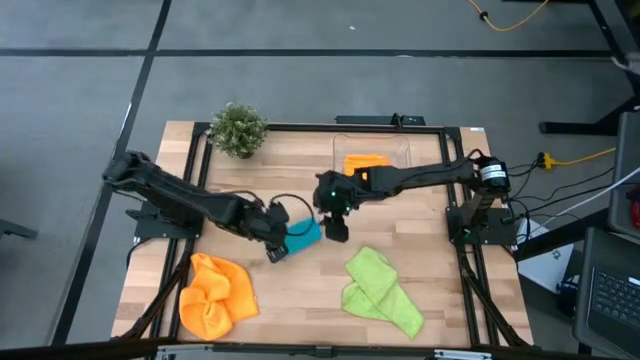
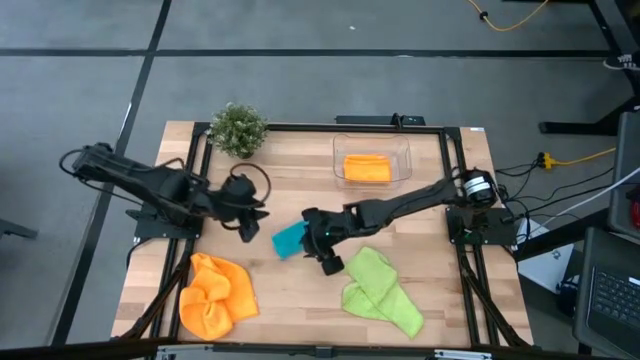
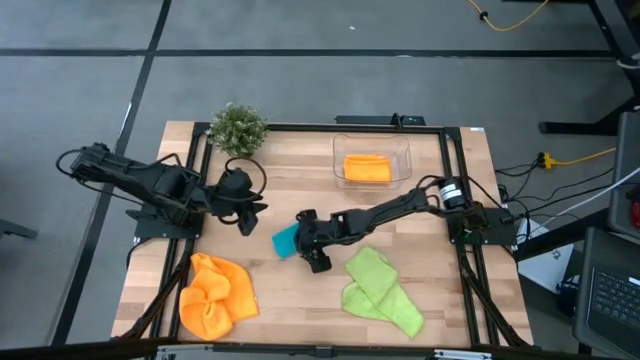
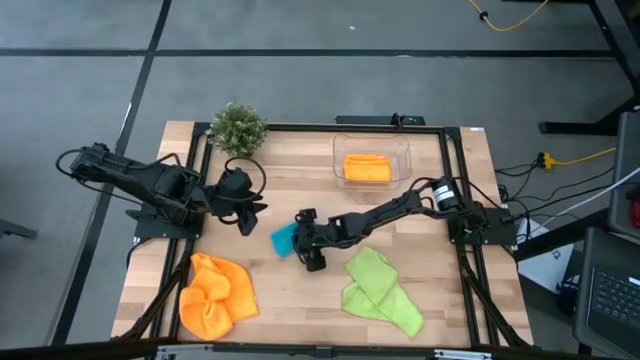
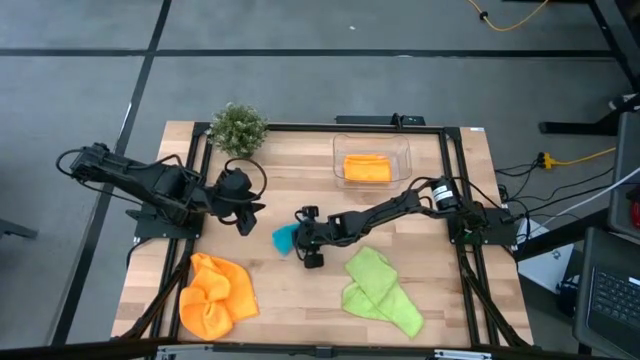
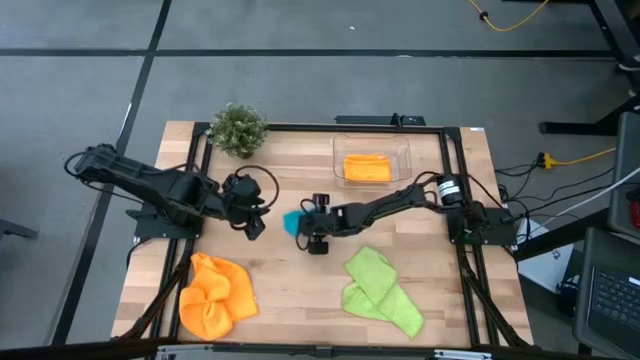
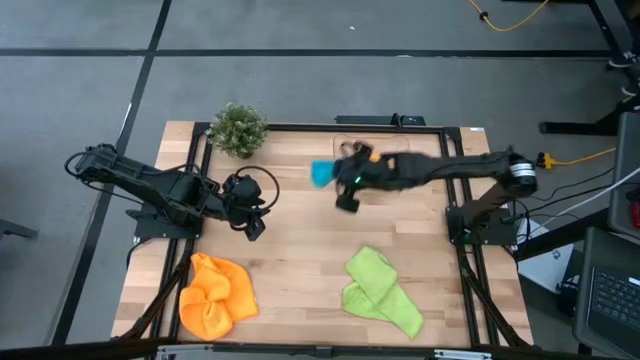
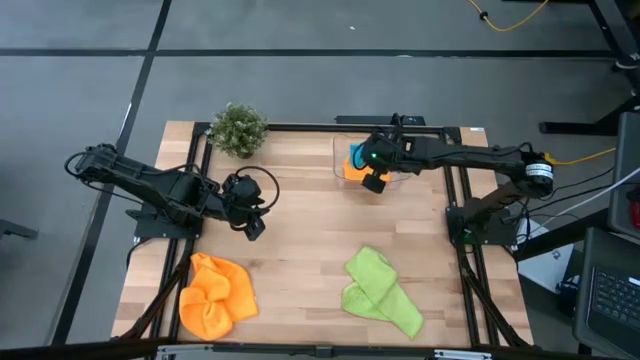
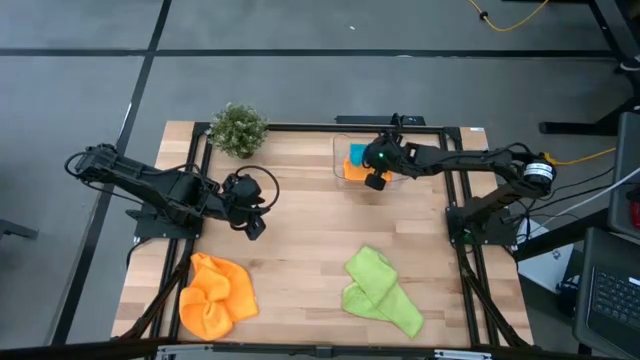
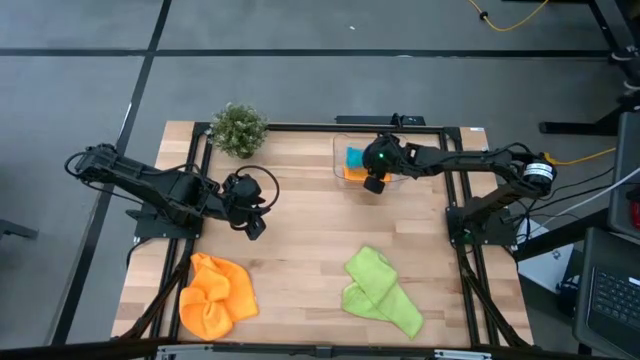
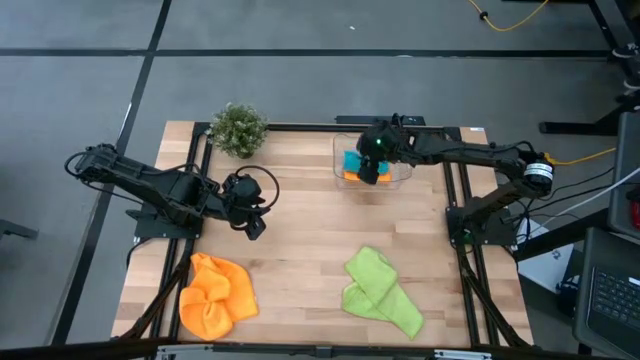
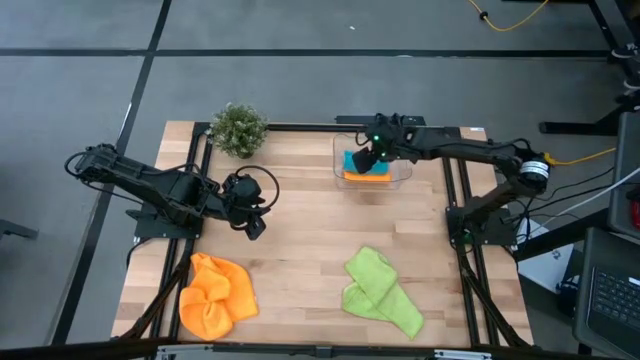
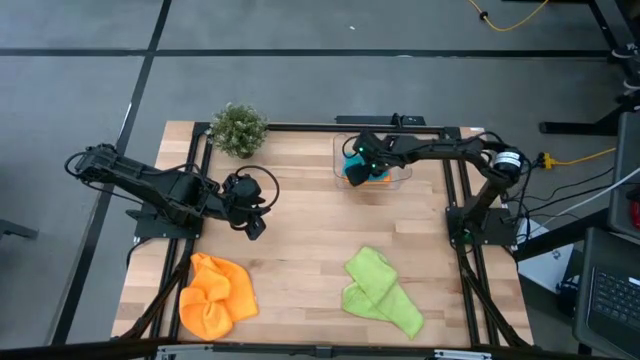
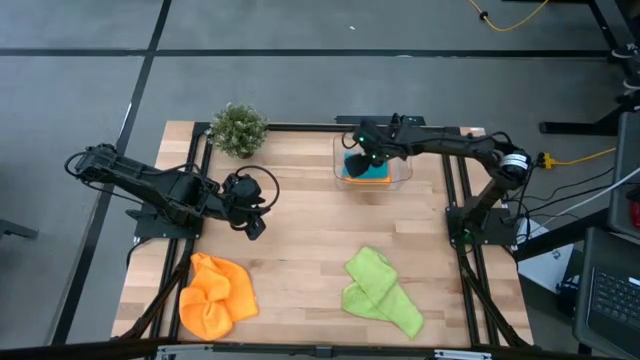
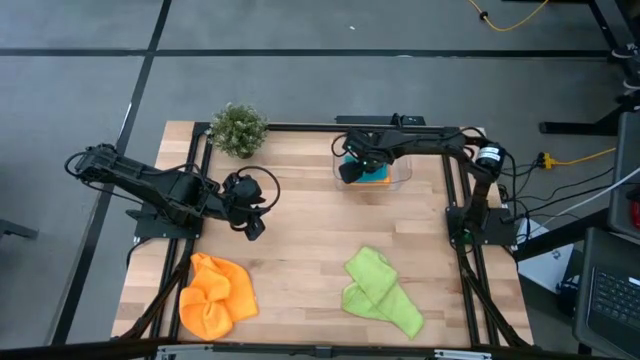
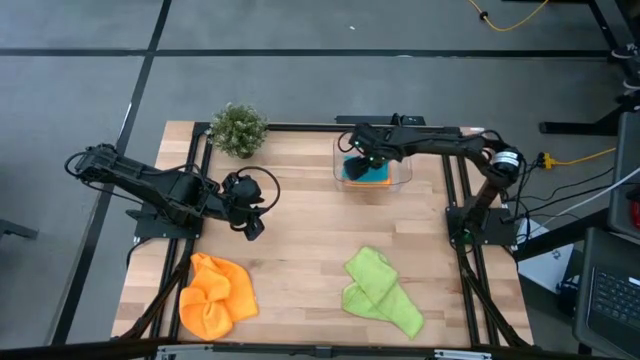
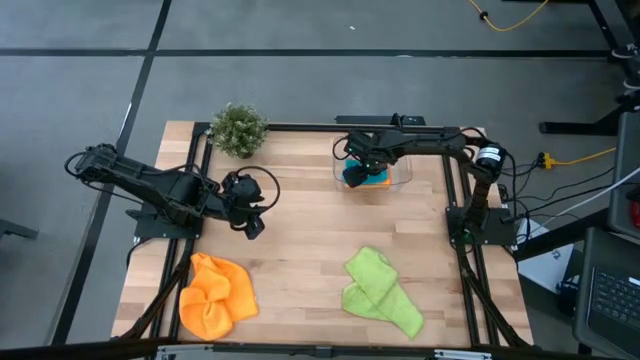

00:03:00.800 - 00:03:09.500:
Task: Fold microfiber towels
Stack the blue microfiber cloth on top of the yellow microfiber cloth in the bin

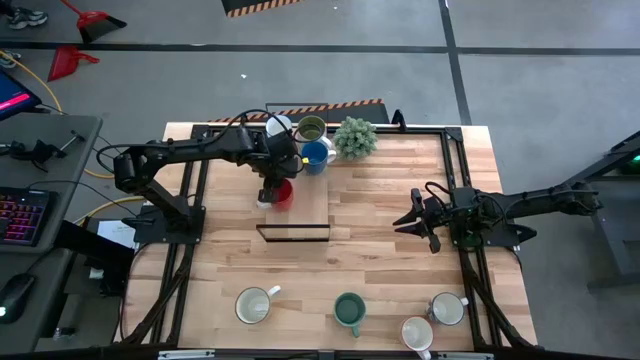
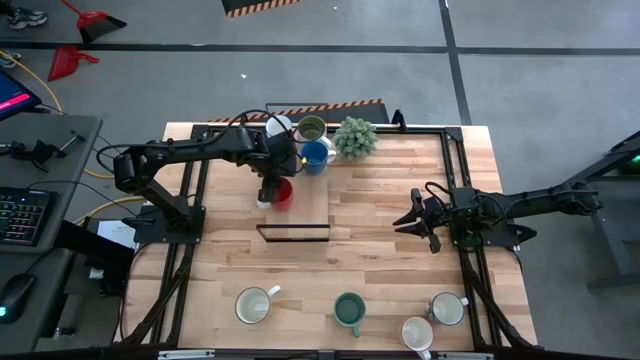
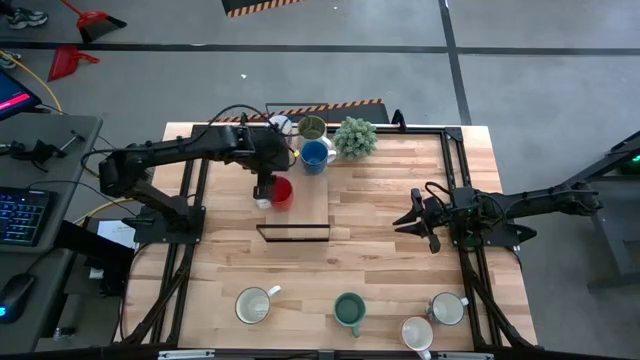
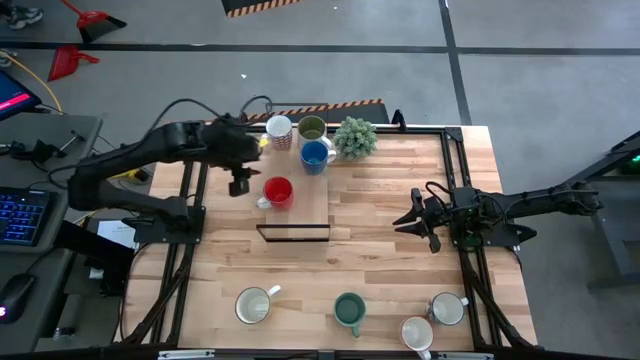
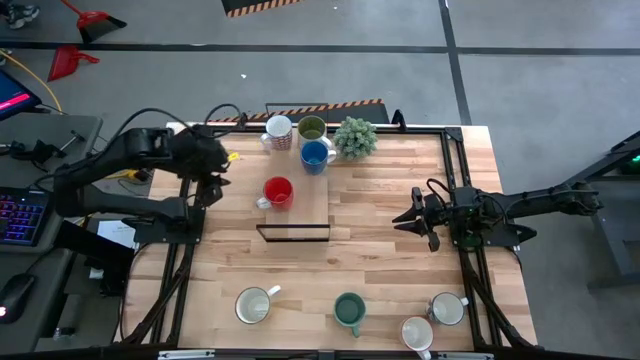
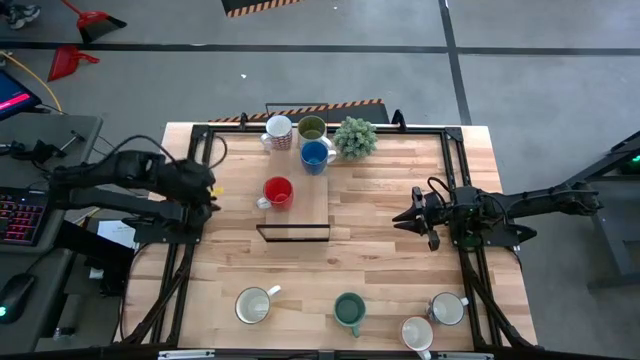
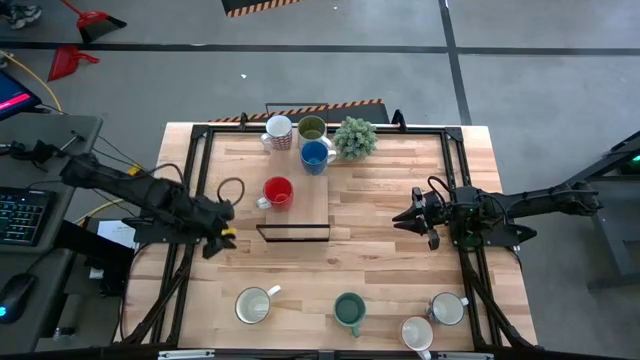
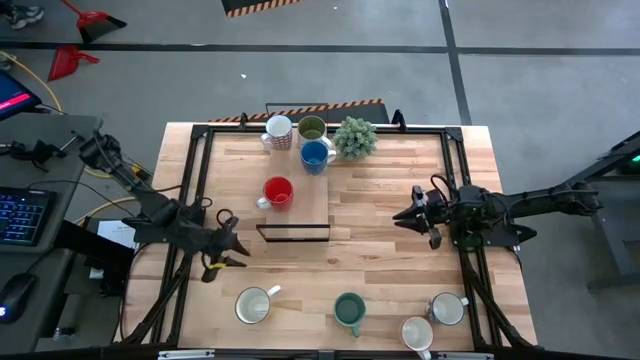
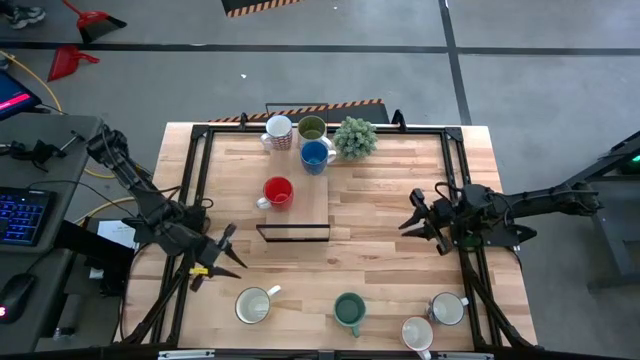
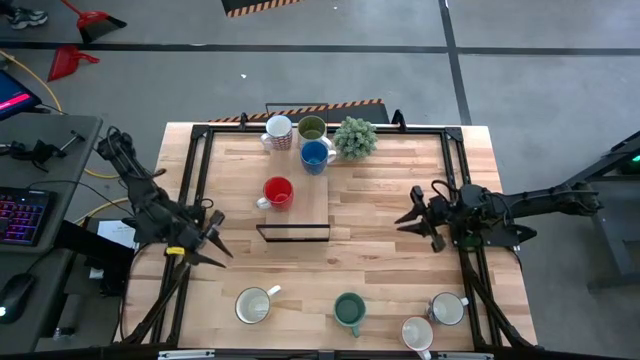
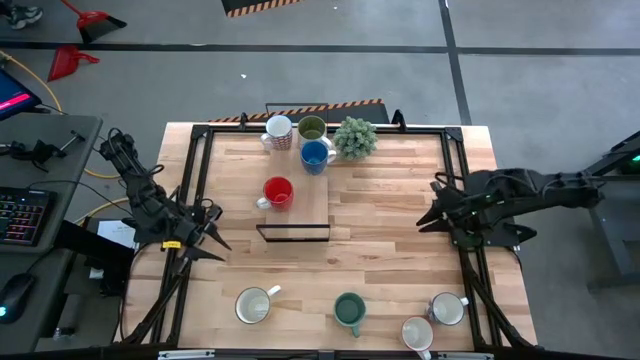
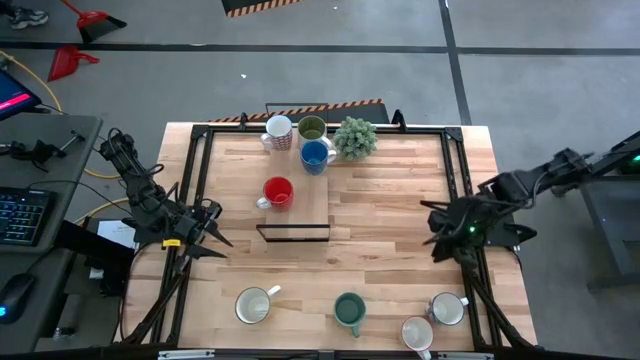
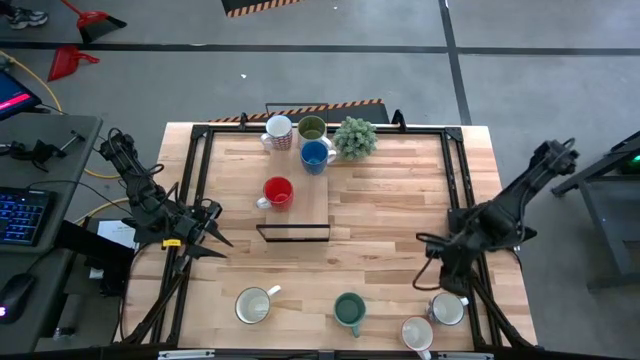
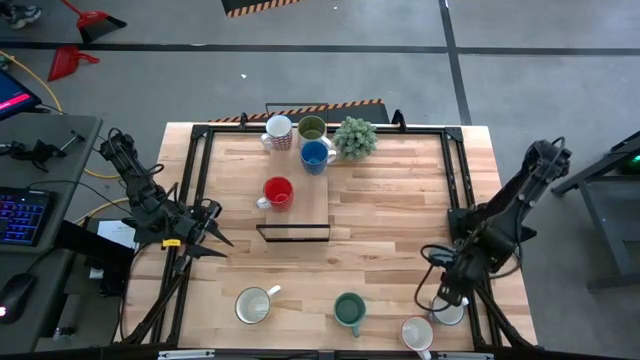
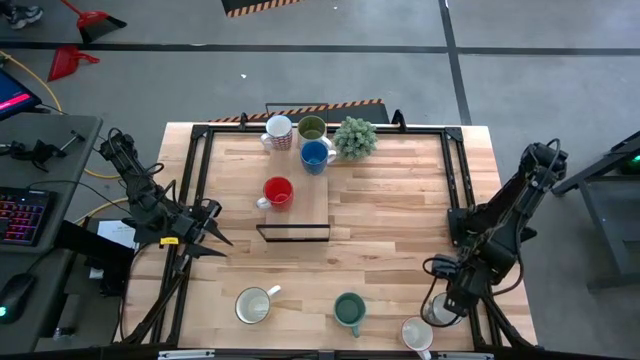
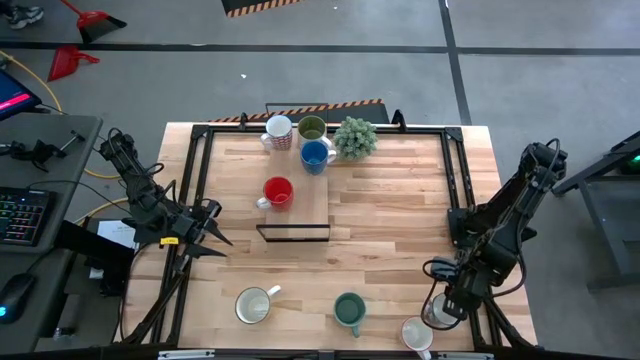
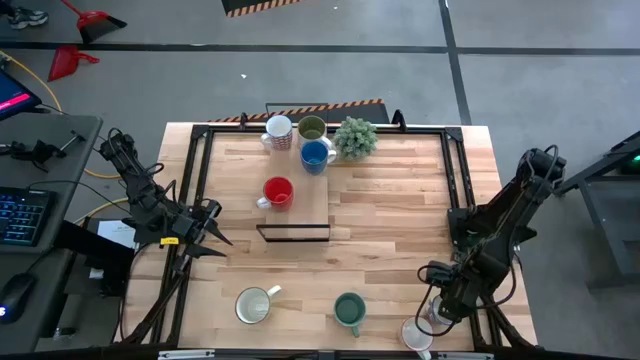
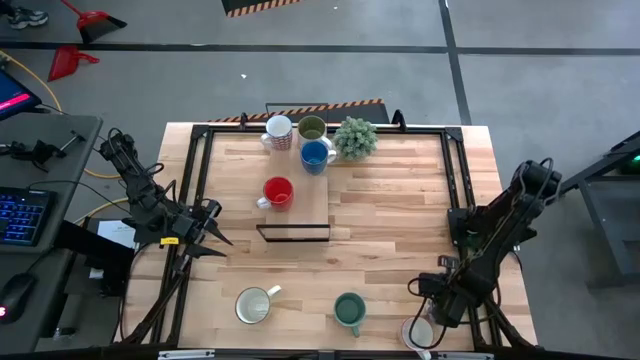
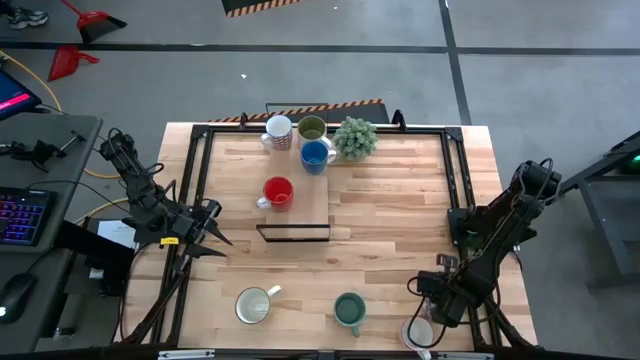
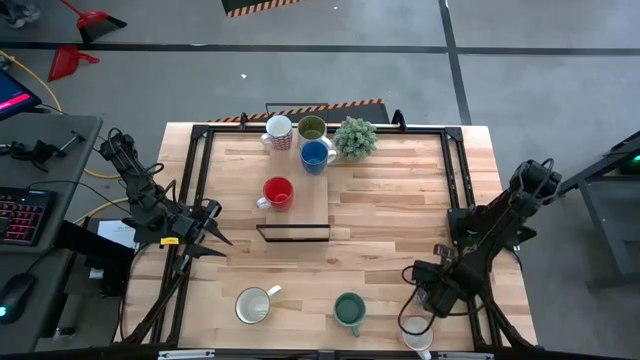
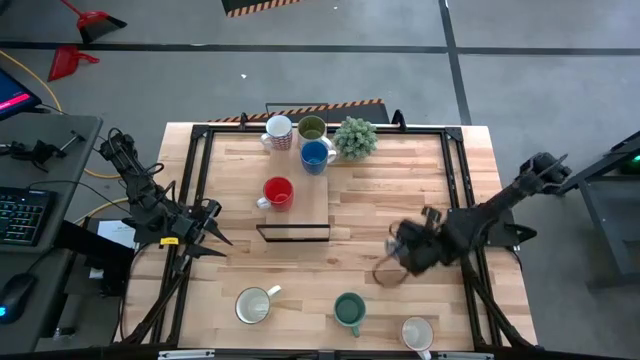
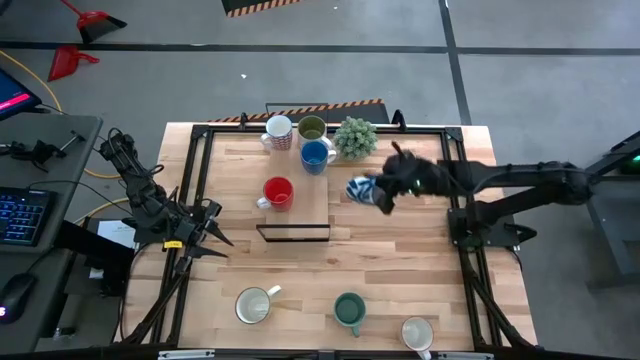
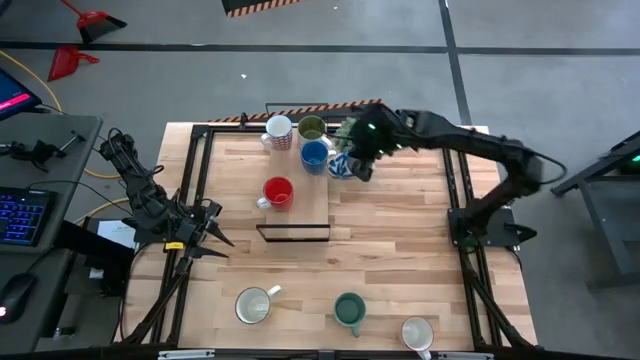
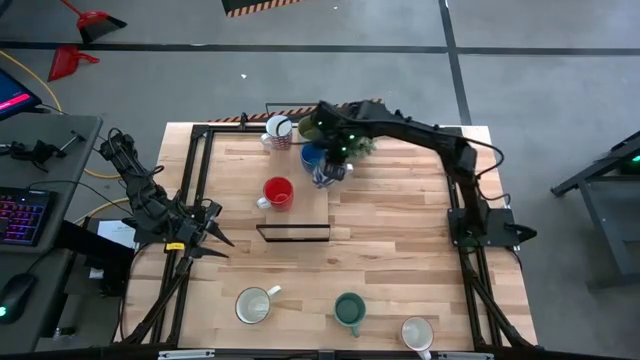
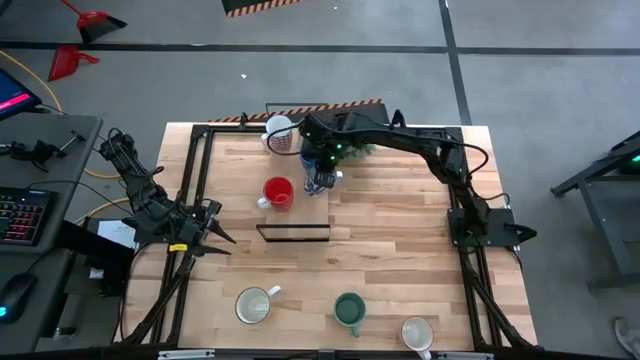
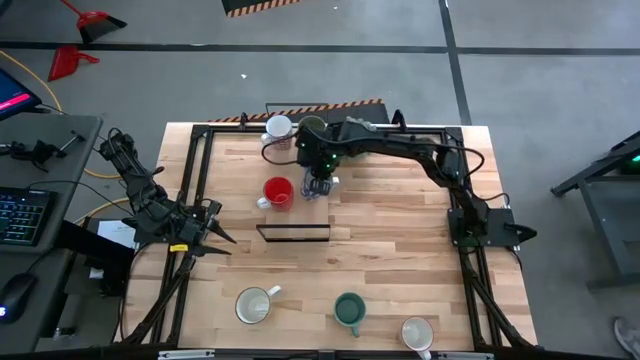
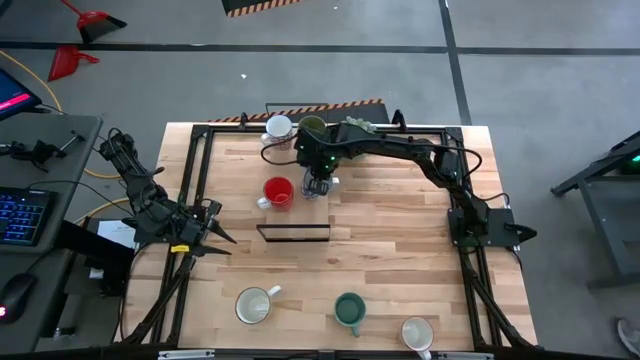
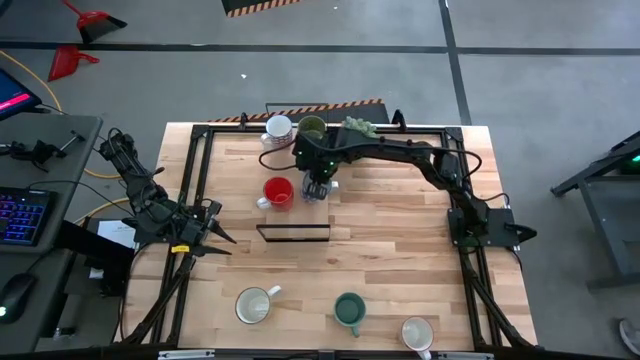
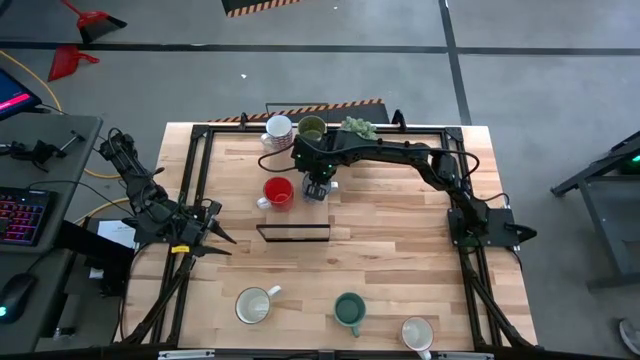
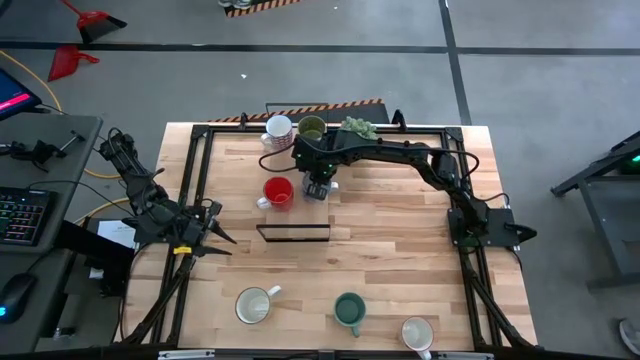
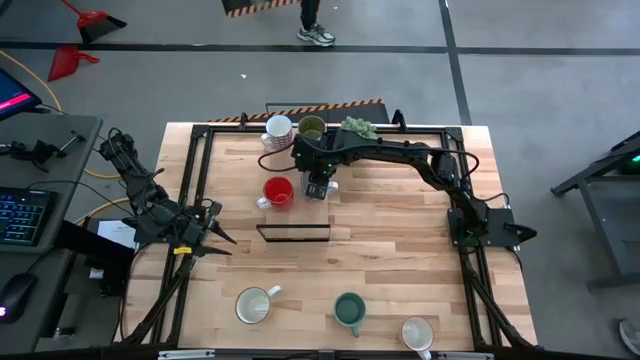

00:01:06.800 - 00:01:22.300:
Task: Place coffee mugs
Put the blue patterned mug on the shelf
